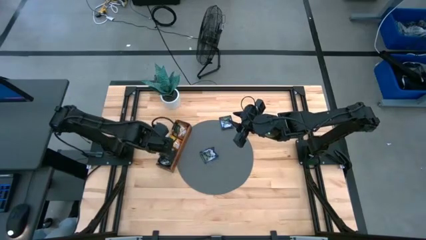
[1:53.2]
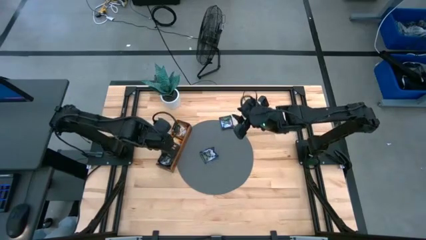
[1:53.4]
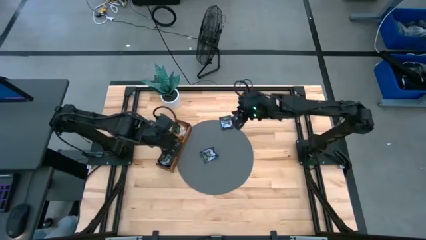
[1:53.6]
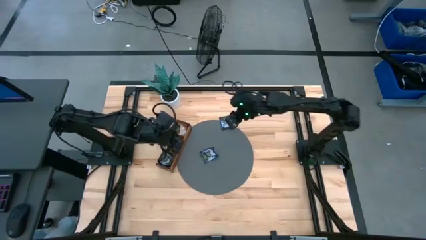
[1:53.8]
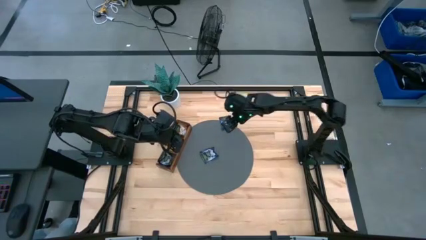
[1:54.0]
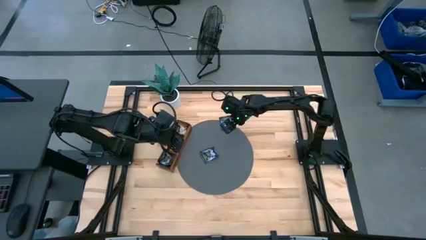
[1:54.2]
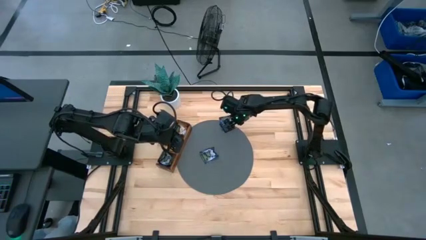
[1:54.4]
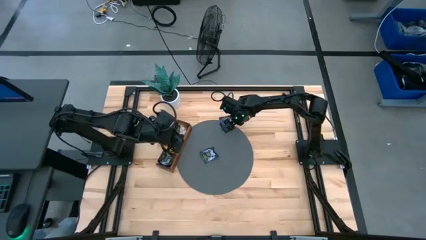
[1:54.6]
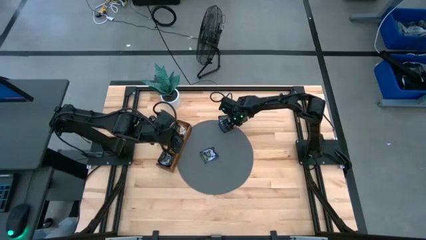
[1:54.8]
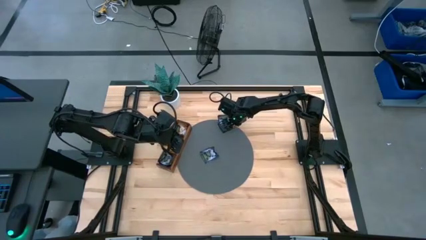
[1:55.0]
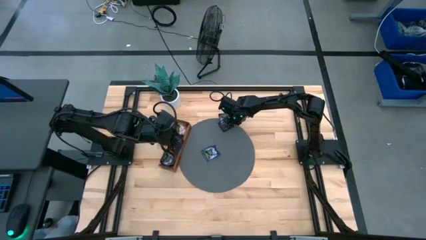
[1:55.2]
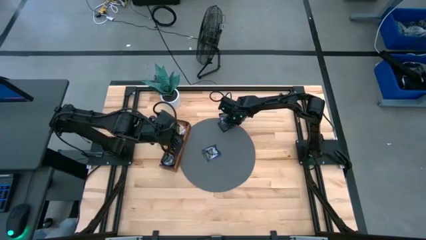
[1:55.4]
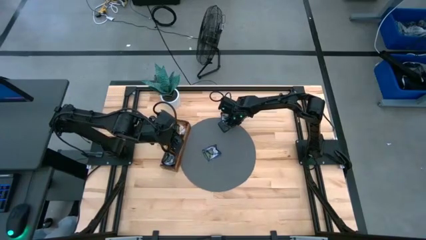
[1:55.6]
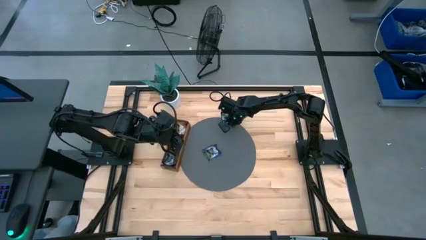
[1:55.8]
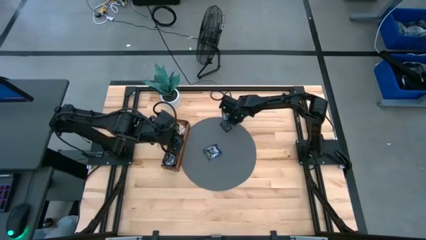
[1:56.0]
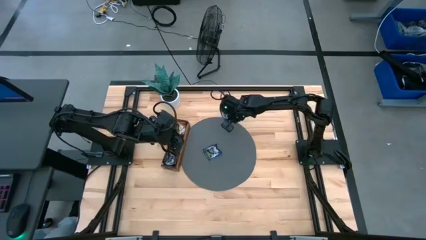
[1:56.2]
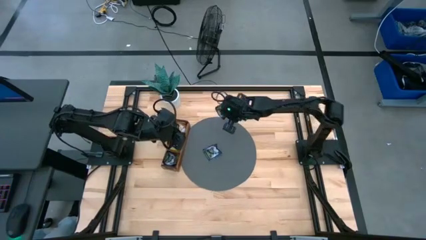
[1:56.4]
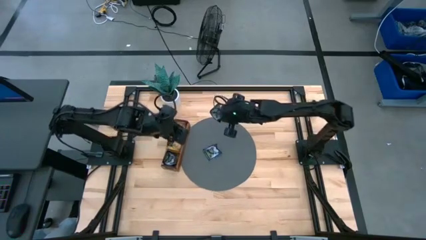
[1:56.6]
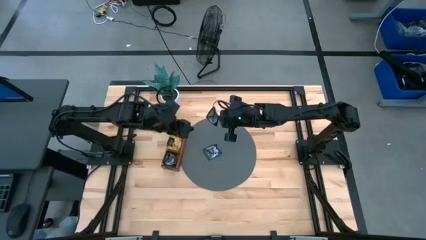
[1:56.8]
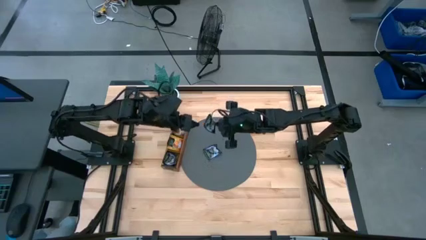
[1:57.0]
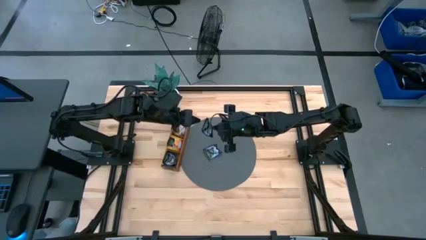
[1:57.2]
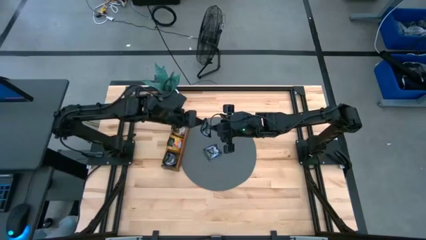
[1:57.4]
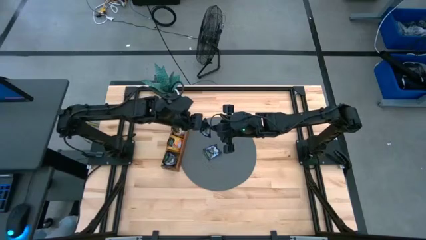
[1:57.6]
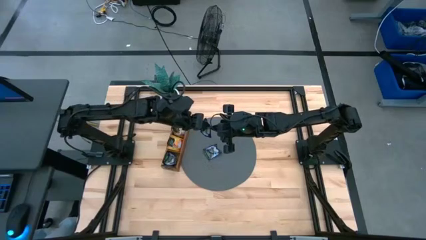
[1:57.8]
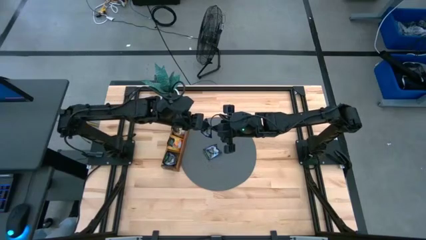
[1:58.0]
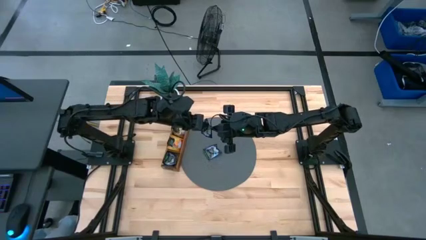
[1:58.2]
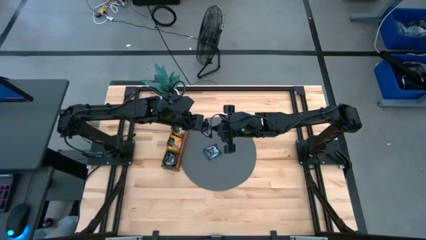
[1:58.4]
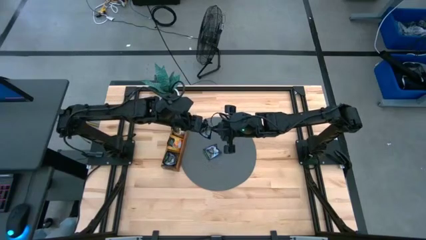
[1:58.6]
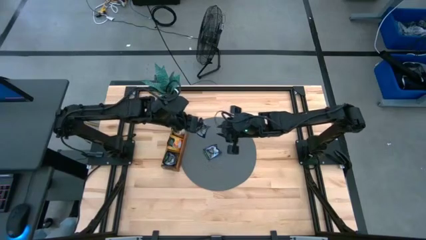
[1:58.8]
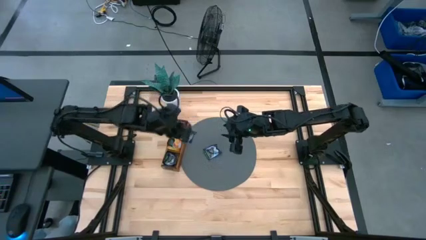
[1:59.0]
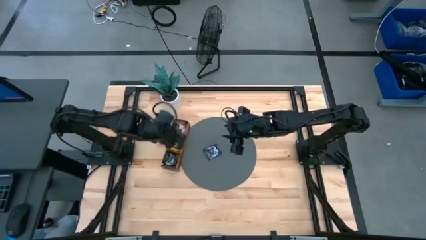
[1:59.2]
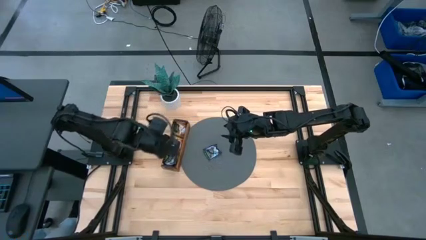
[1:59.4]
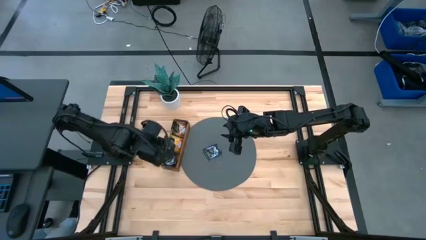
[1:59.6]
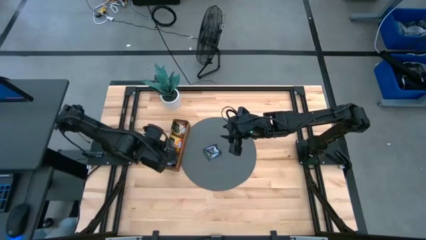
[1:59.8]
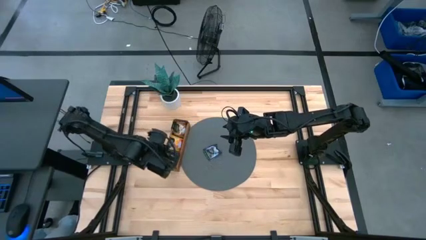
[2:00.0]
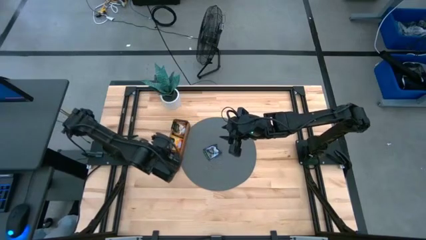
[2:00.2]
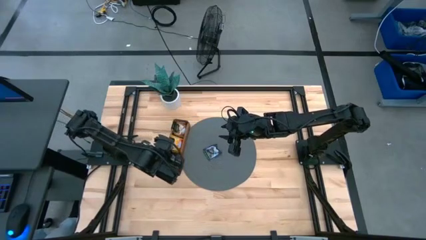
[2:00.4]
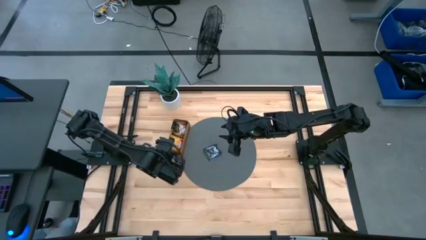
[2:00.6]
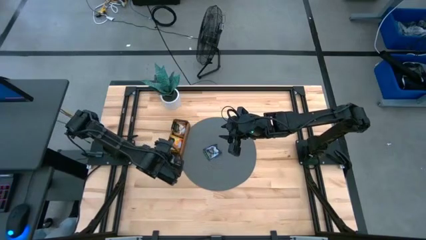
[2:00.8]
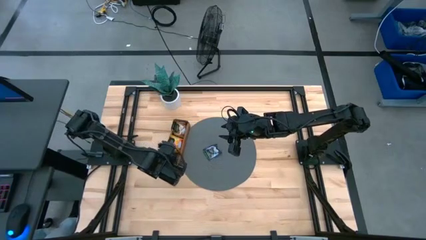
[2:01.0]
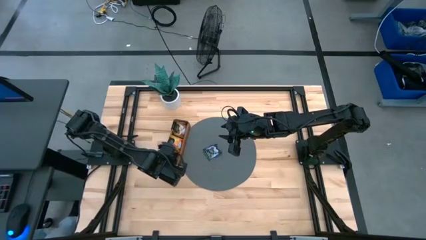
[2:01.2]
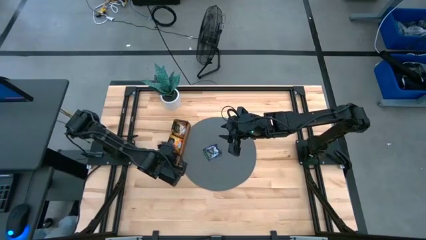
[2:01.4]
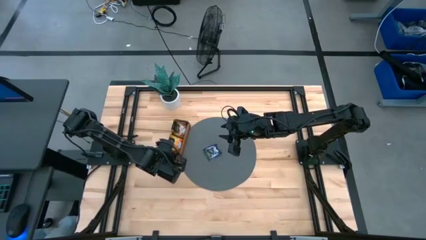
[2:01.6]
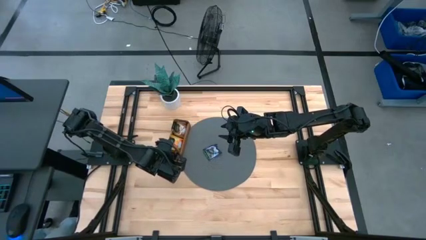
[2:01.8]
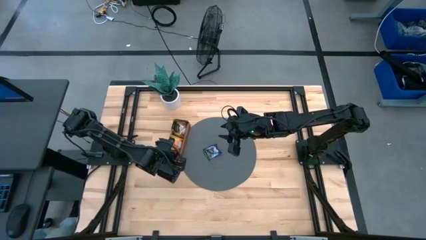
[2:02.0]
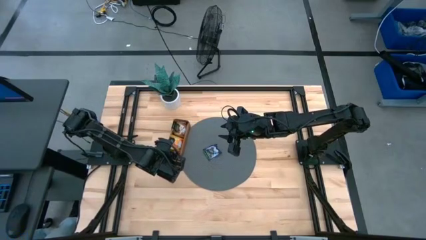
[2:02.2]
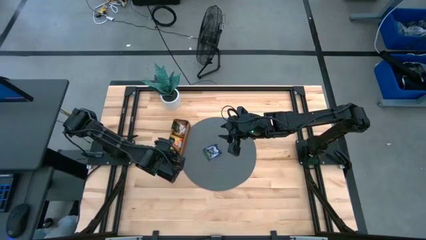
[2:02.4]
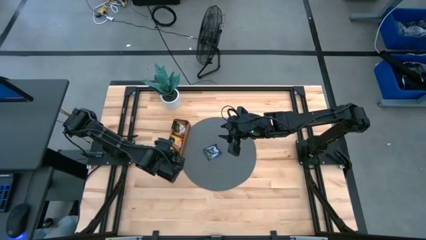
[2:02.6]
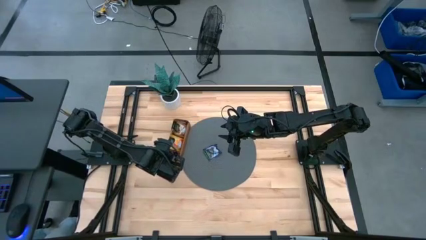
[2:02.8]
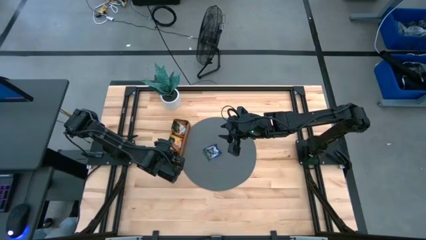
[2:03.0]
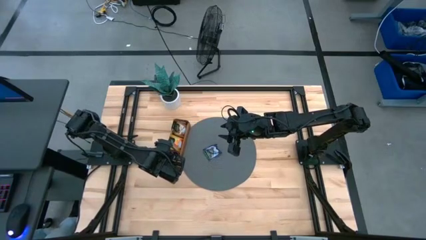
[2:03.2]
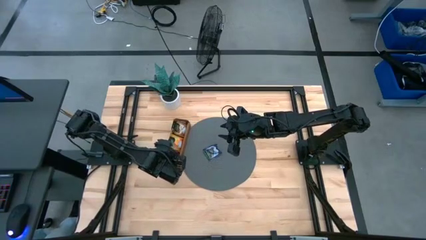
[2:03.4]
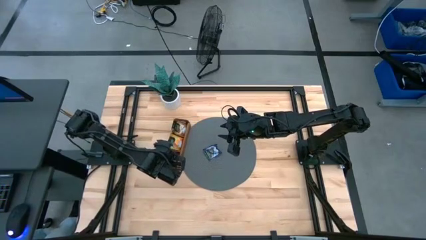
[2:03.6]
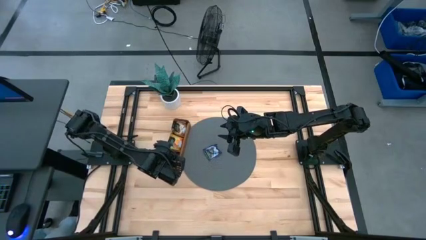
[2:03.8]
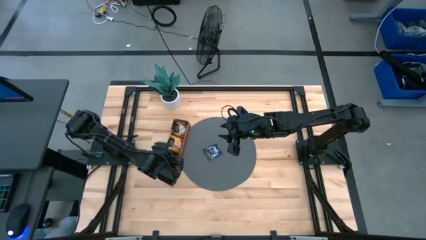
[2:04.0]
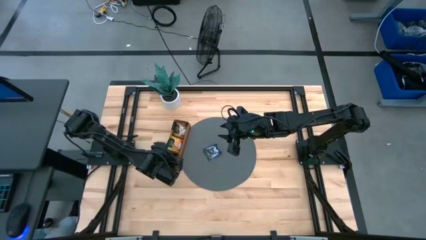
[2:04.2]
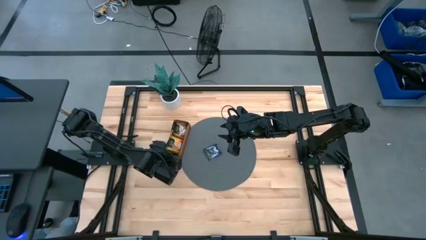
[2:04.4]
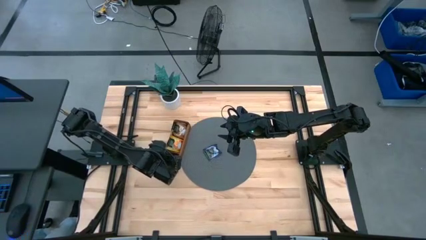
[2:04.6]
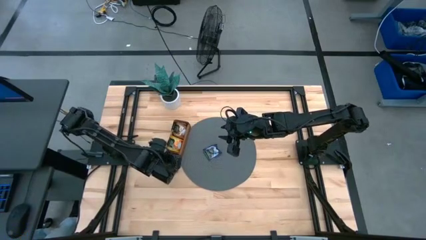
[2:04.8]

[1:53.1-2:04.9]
Task: Pick & Place Tea
Put the purple tea bag into the bottom section of the wooden organizer

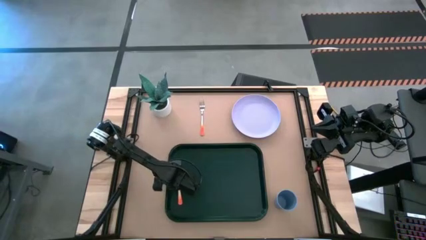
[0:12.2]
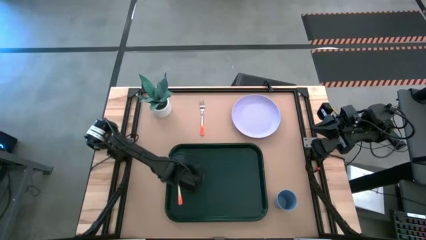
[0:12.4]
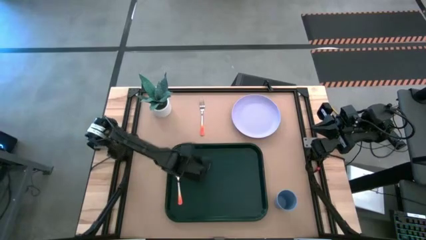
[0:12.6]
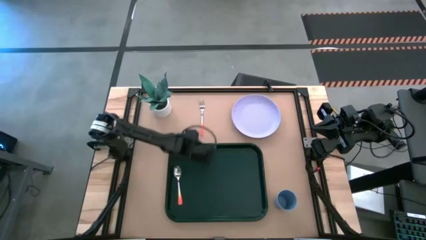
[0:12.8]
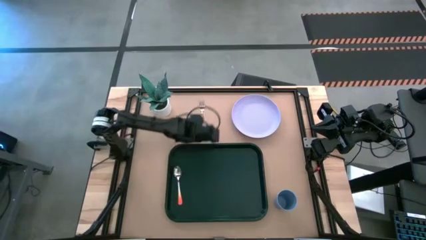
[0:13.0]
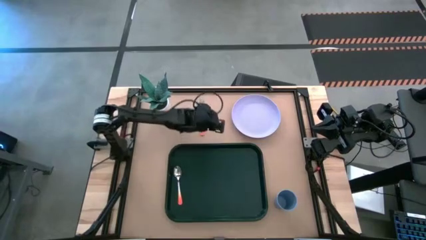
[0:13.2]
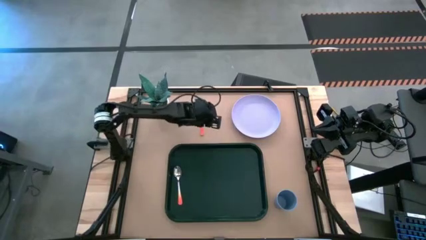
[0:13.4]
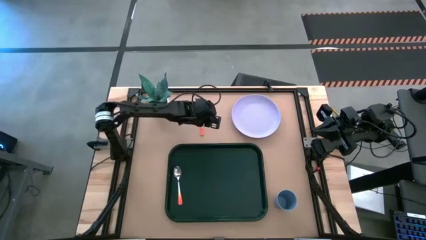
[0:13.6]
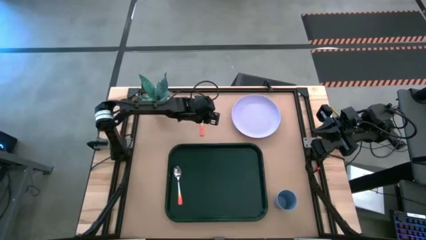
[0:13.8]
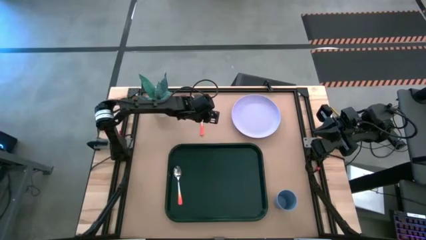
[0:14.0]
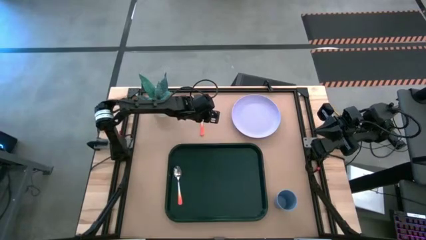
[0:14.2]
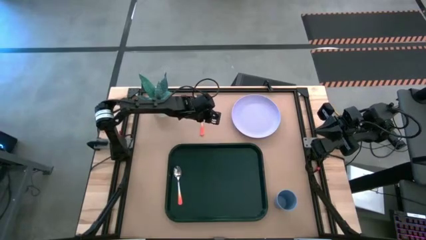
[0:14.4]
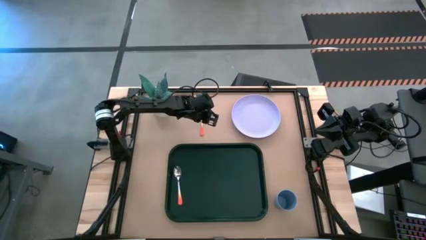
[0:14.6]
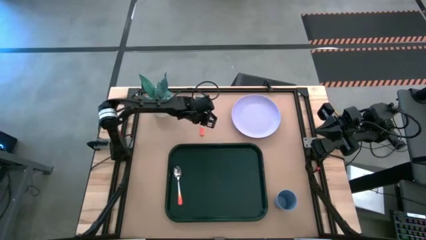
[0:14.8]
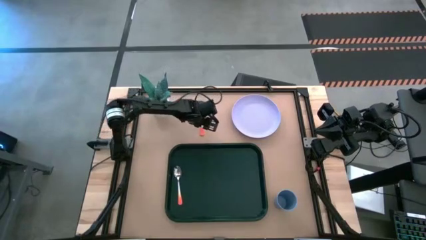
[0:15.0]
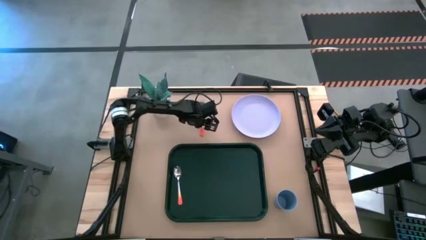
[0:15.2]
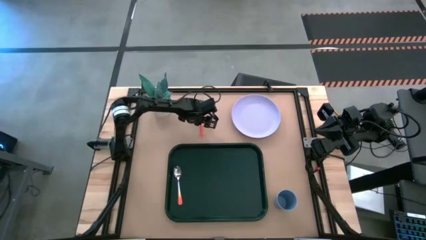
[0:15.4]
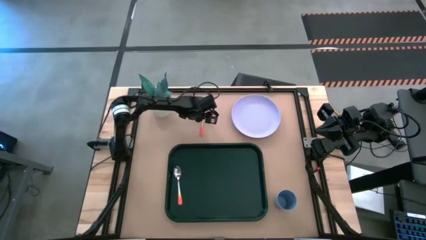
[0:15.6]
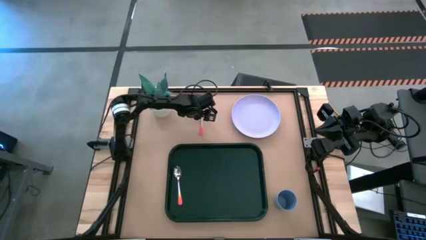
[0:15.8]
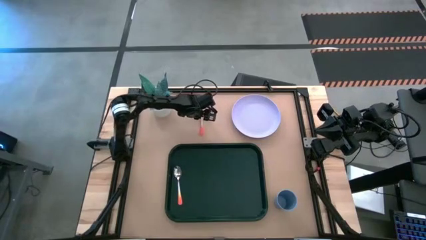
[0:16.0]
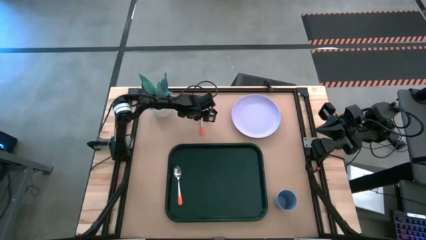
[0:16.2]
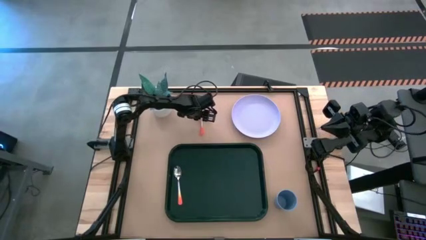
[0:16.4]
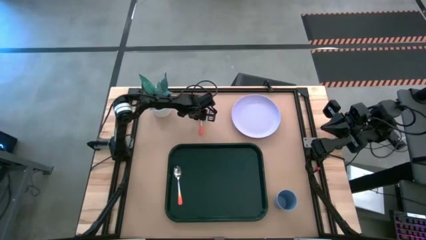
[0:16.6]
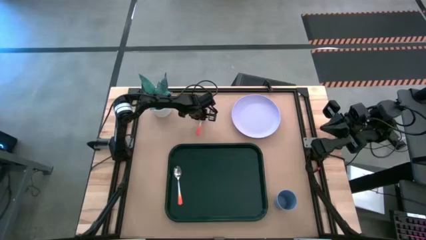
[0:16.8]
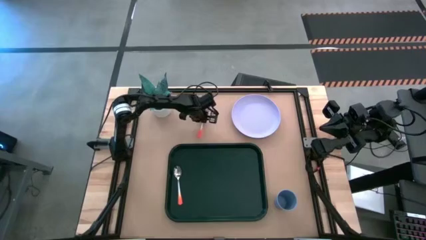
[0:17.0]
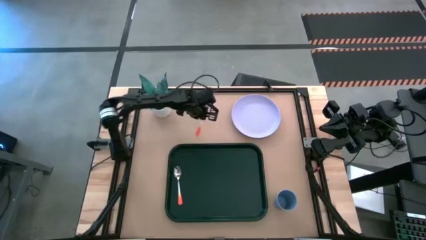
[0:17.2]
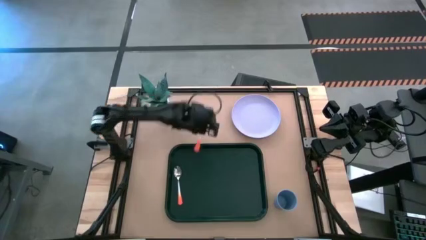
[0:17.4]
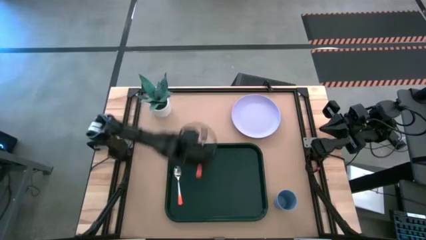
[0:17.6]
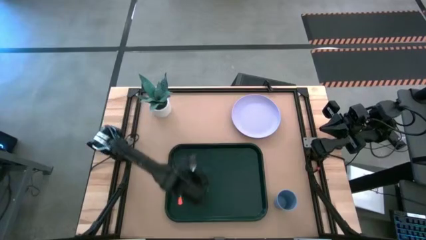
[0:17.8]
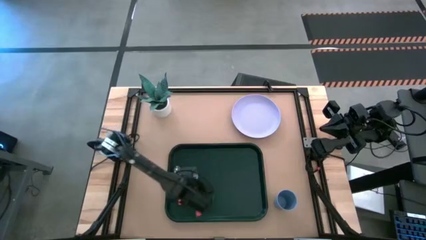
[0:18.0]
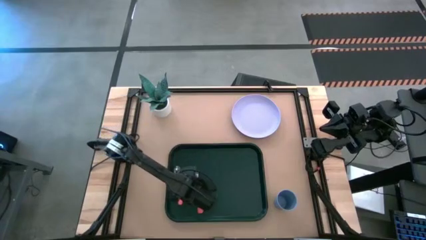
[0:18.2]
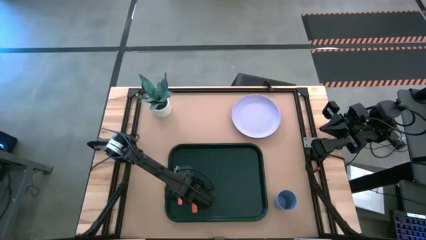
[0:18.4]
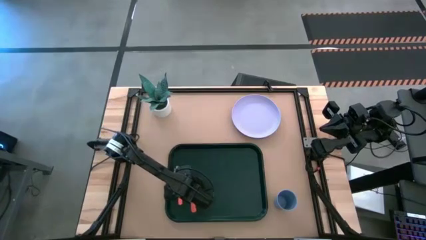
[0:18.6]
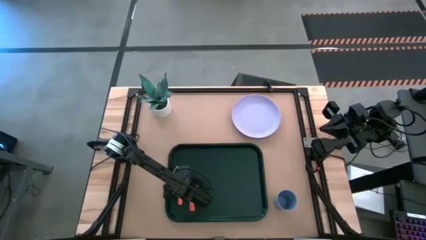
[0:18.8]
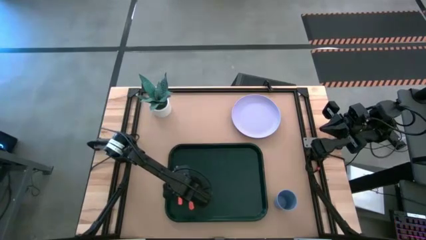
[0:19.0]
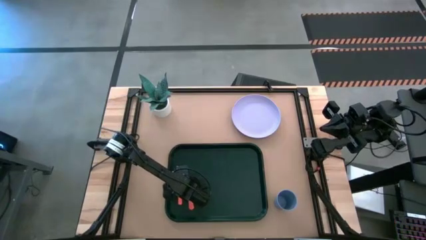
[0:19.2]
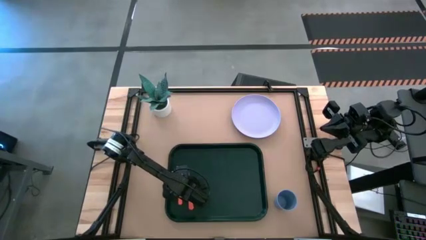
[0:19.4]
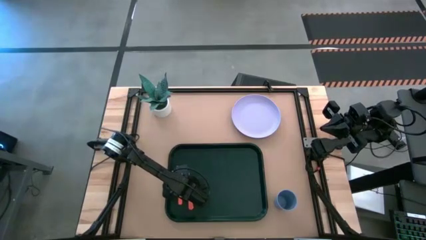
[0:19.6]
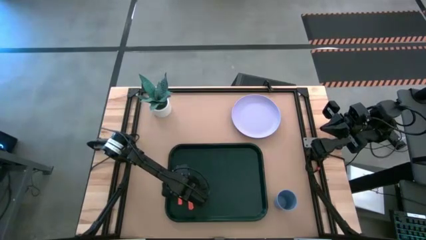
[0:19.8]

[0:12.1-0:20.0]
Task: Pick and place plate/cup/fork/spoon on tray
Put the orange fork to the right of the orange spoon on the dark green tray
